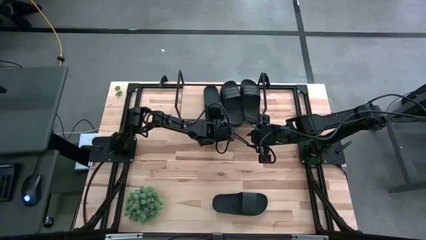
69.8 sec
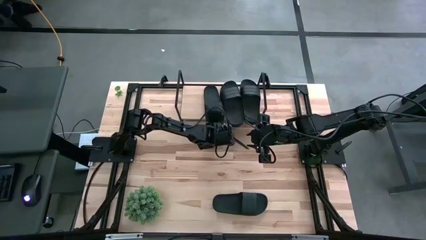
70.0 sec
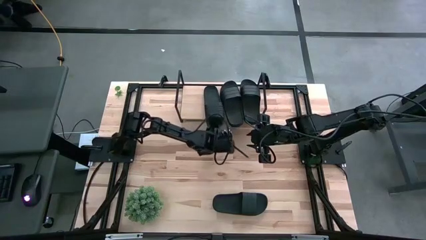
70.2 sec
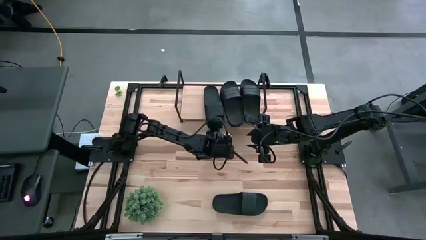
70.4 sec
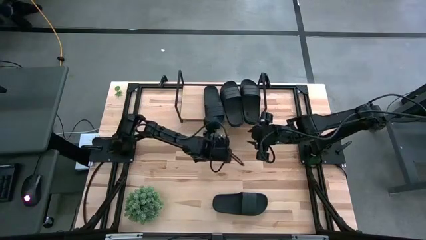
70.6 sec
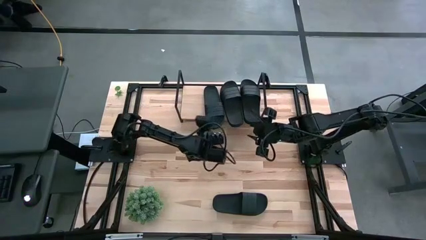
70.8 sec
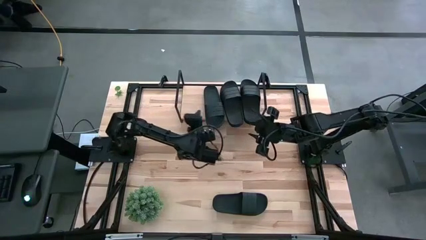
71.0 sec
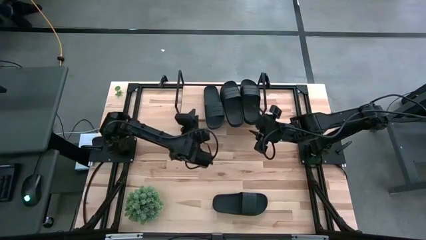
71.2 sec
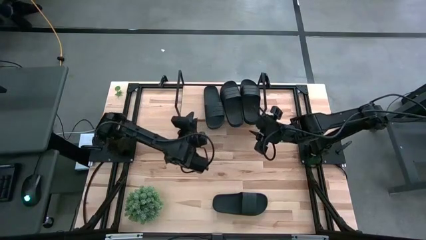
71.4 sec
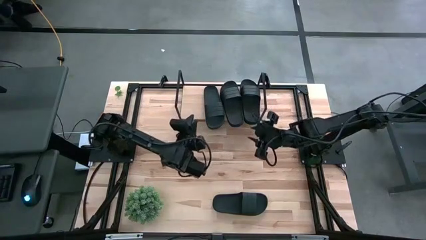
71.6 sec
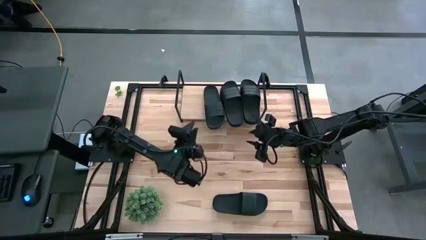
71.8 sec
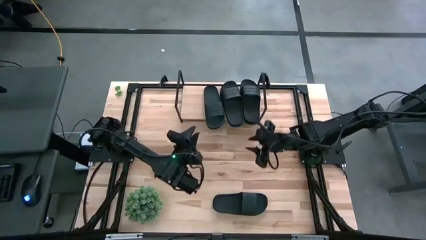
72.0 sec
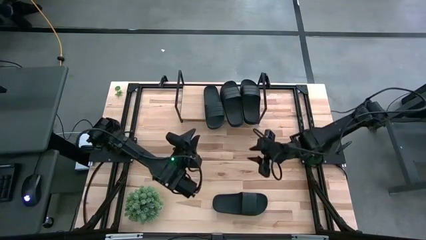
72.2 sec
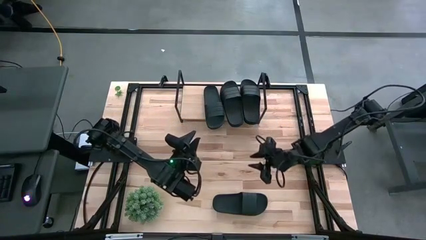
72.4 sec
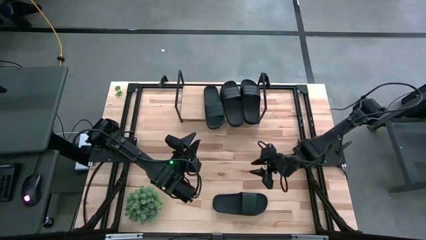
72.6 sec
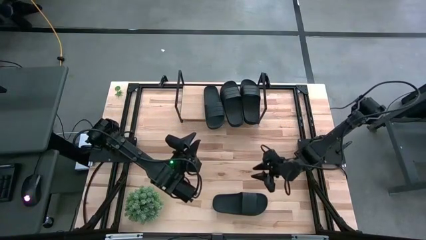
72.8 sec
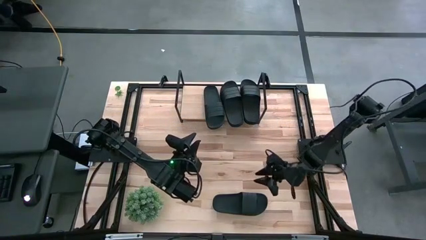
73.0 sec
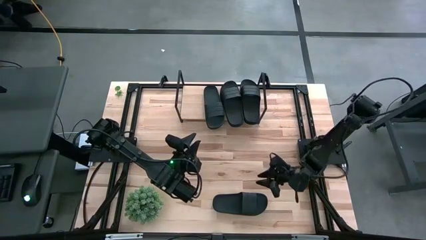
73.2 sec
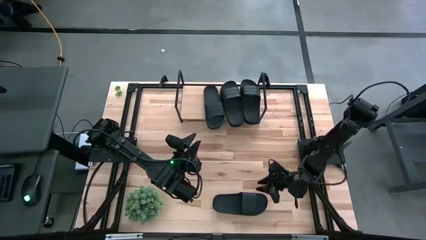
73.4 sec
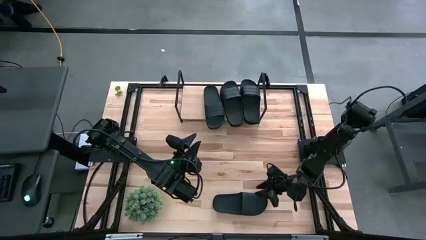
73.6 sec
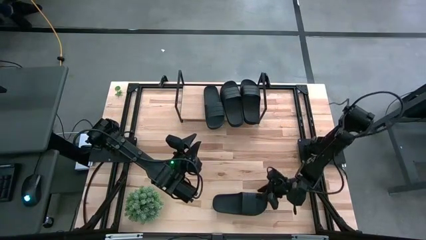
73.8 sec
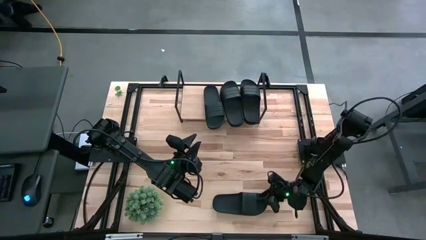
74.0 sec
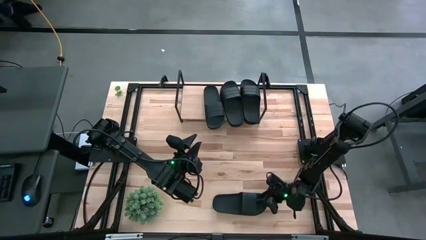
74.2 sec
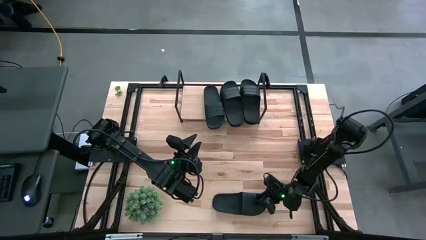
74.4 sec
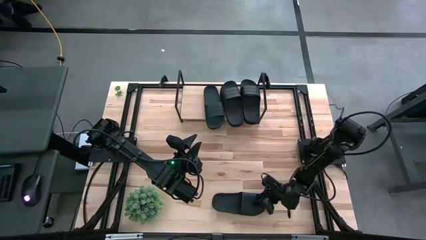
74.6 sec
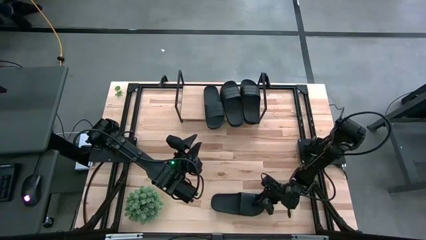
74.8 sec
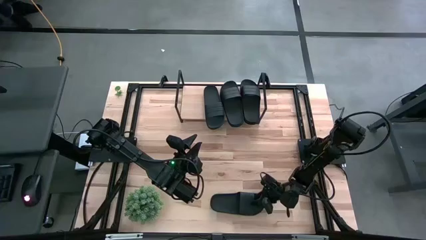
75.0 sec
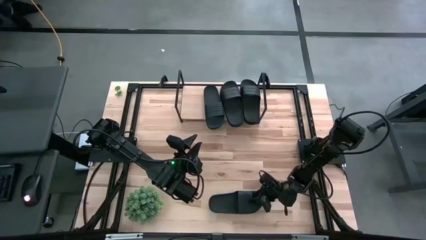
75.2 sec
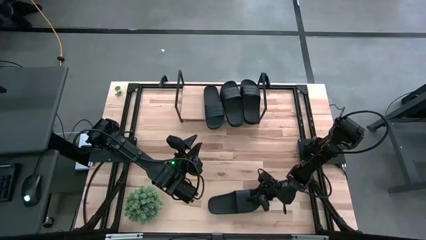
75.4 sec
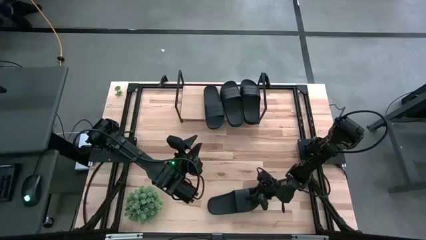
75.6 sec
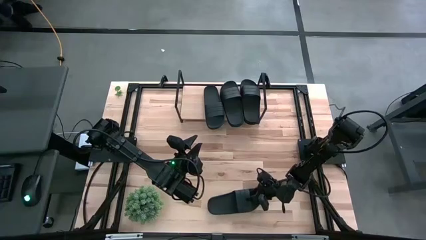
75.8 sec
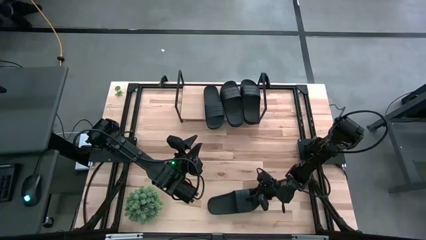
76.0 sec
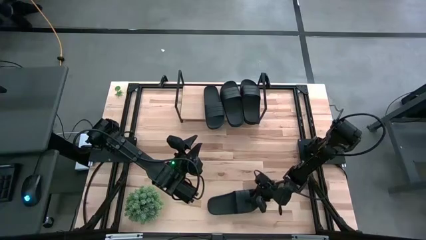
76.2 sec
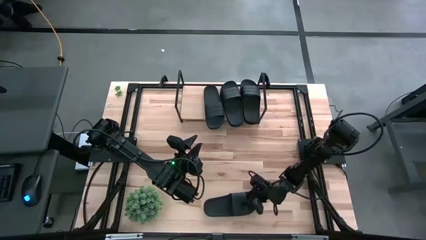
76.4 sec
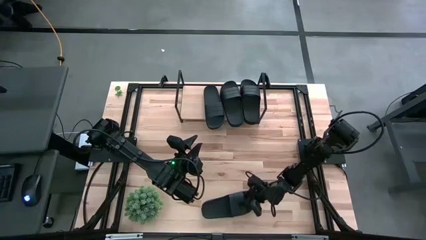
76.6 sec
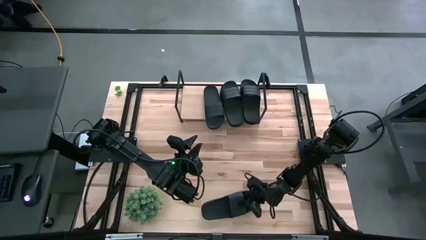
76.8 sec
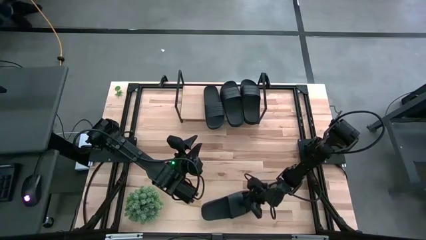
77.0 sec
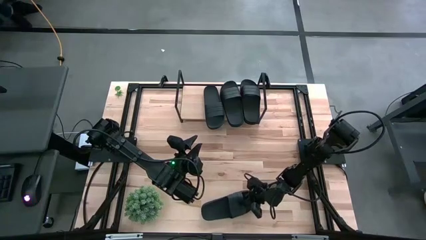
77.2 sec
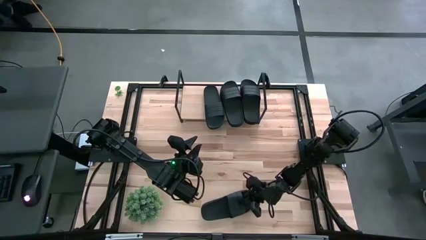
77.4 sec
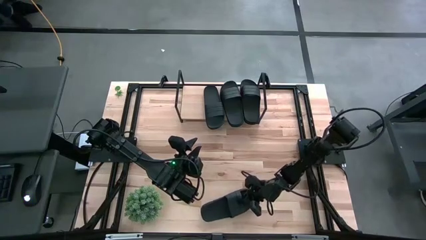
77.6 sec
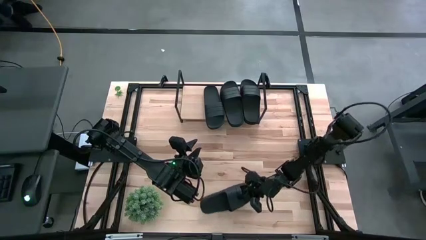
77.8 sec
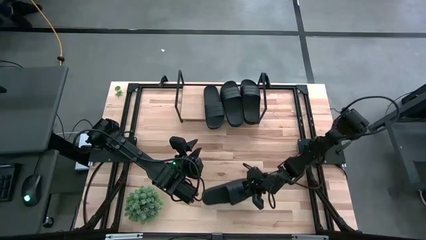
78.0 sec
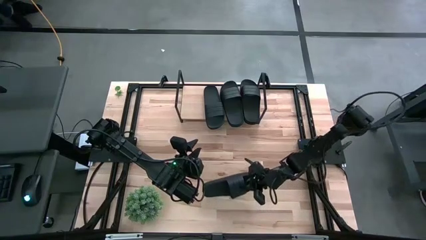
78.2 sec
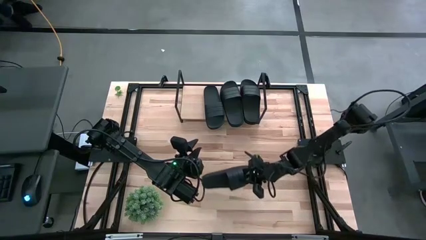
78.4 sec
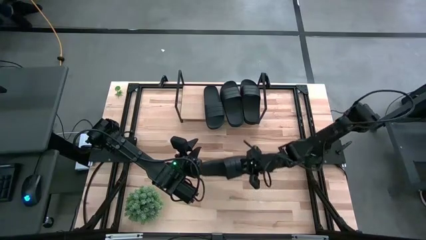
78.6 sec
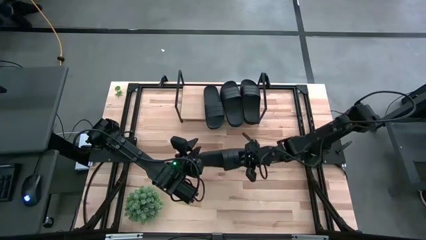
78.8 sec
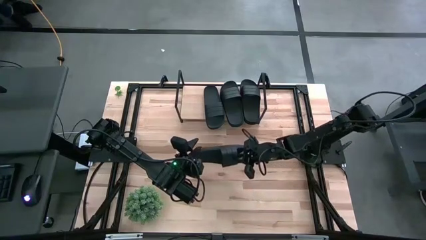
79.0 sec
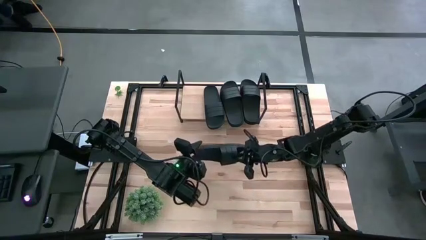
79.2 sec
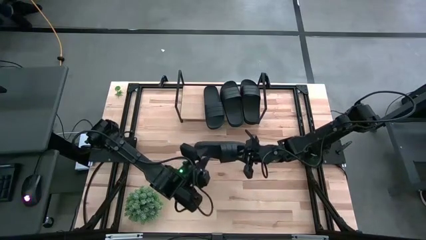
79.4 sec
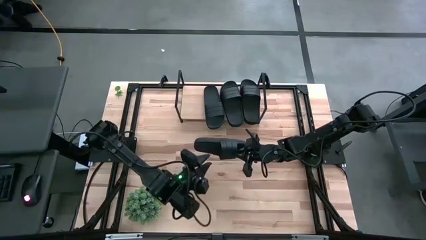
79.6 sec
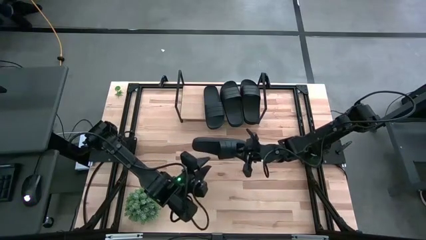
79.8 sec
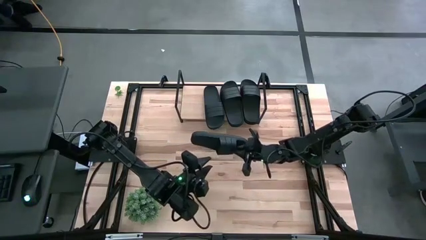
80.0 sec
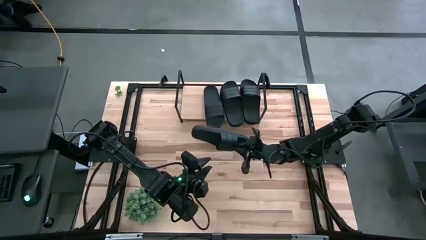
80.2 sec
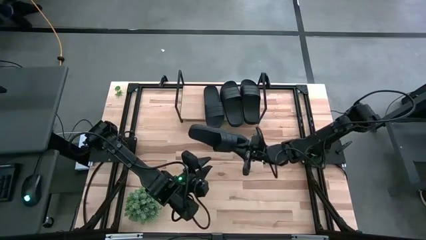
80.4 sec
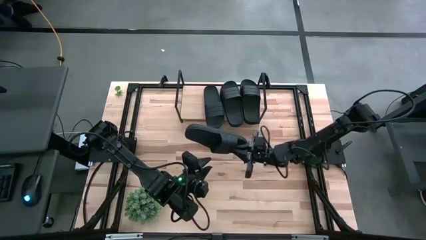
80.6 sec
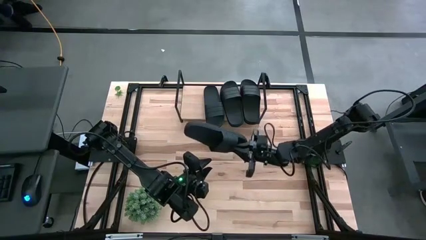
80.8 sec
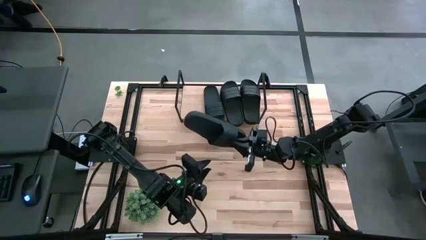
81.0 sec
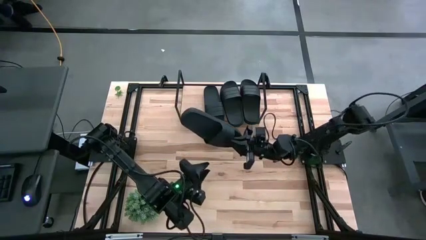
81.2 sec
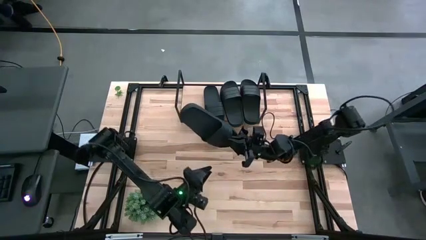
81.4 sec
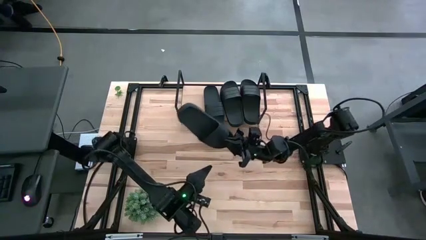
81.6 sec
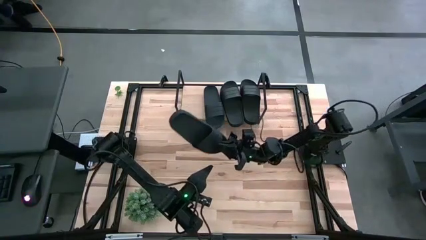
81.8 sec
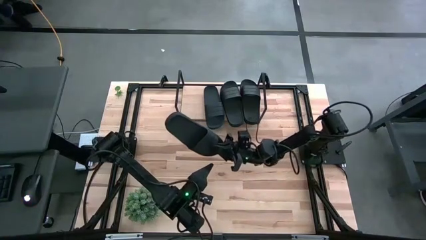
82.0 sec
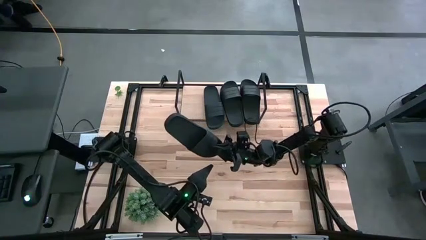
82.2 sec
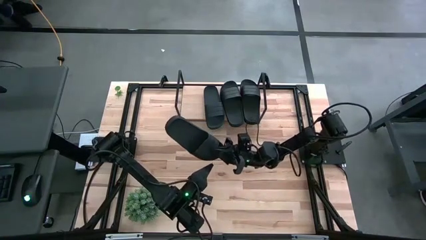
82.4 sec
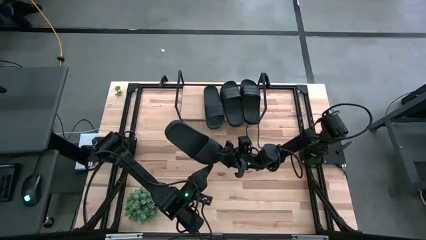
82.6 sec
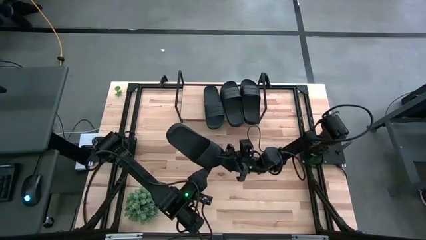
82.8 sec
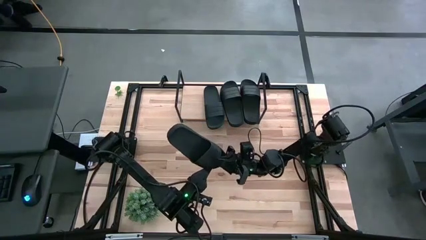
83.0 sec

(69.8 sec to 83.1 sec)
Task: Pick and place slides into the shelf
Put the black slipper on the shelf

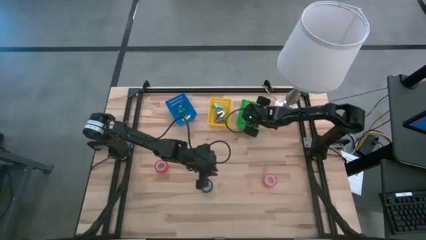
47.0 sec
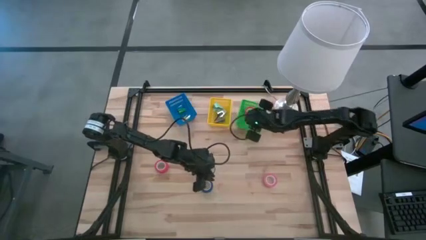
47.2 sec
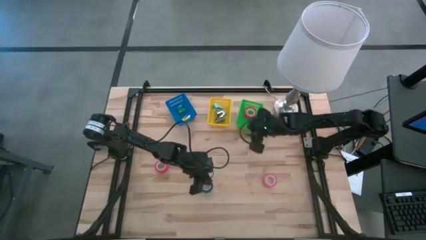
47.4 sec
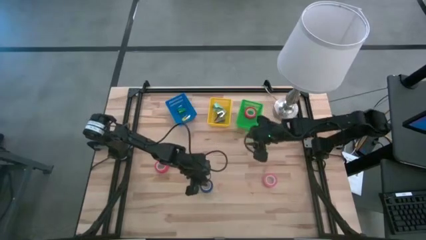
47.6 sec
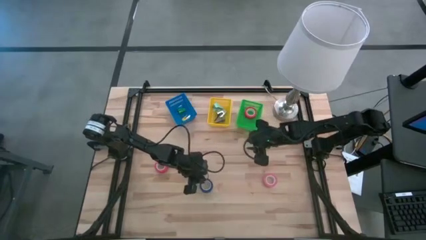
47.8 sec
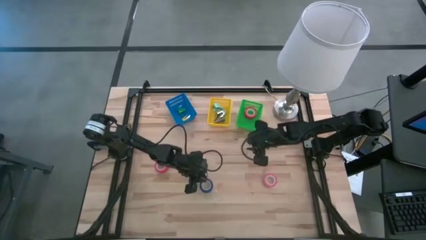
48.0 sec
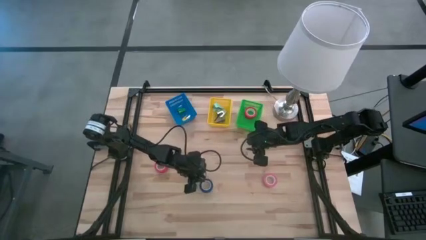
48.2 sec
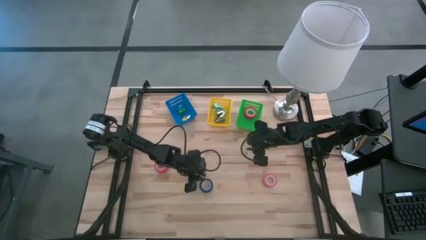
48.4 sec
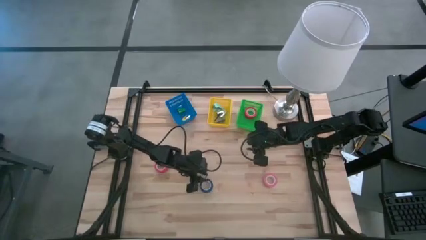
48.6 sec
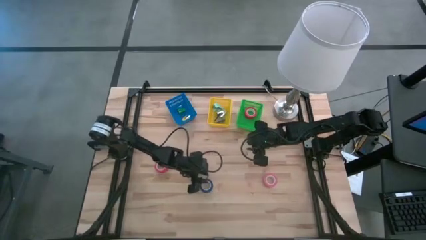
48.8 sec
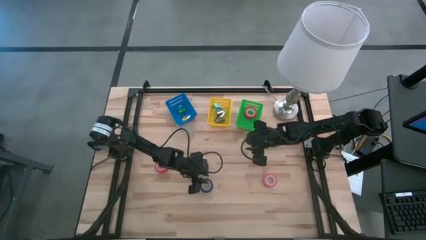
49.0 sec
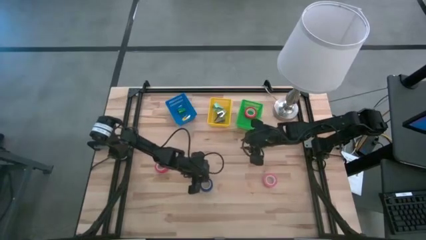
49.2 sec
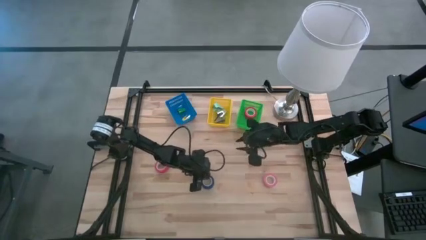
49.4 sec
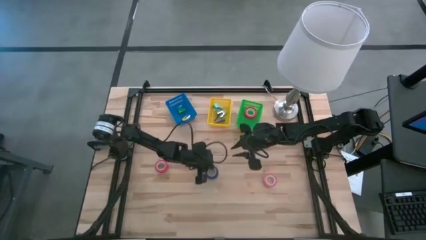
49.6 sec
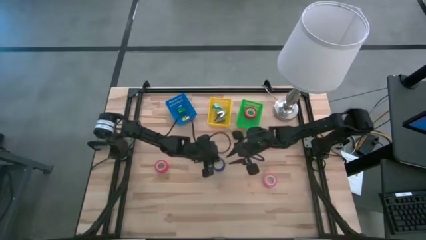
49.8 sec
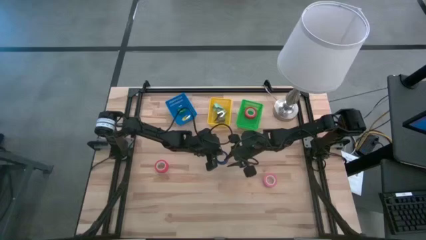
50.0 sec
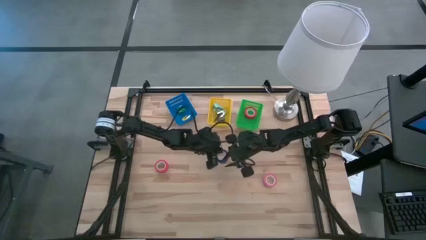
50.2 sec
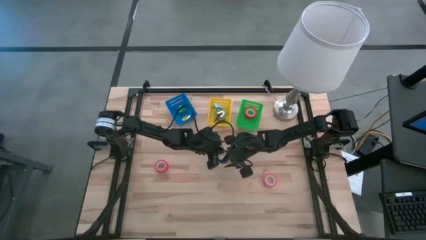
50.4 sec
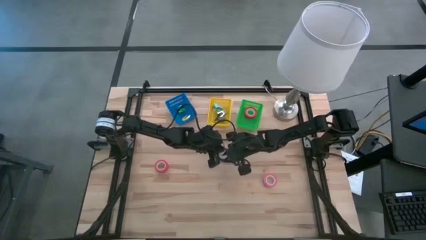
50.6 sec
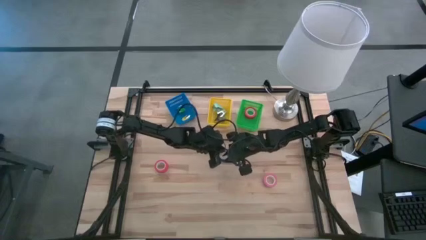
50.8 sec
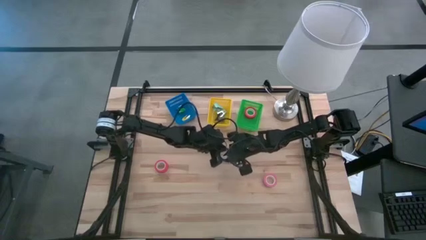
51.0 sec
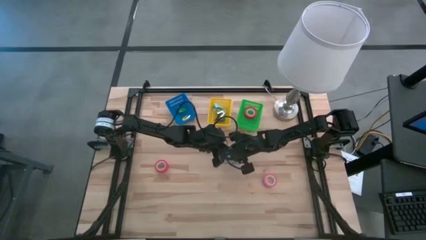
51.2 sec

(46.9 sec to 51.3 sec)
Task: Pick and place Stapler, Stapler remover, tape
Put the blue tape into the green bin
